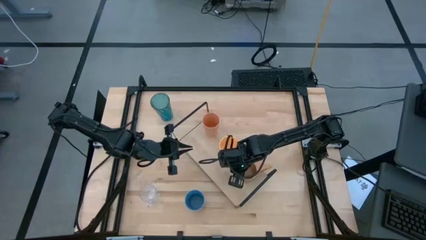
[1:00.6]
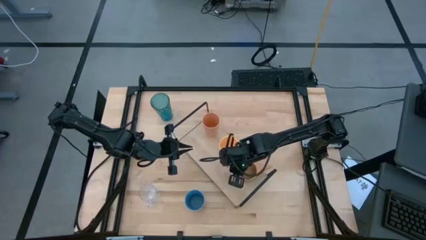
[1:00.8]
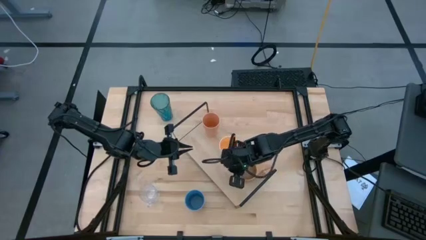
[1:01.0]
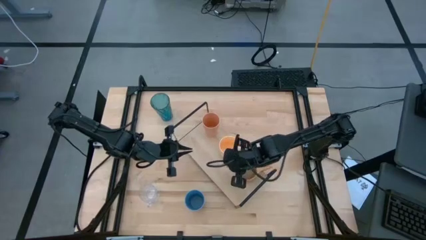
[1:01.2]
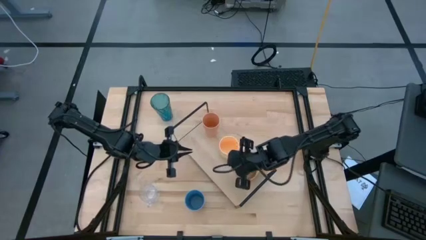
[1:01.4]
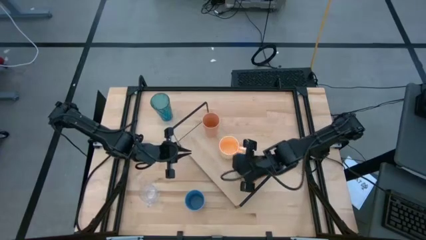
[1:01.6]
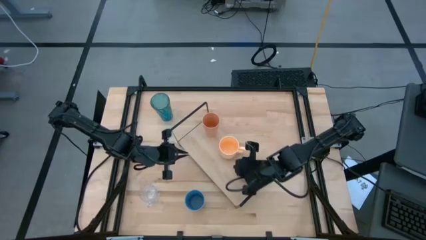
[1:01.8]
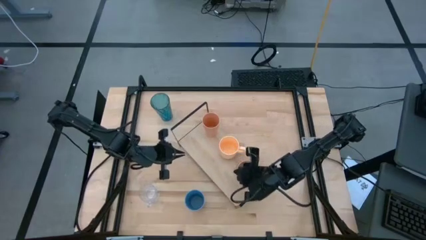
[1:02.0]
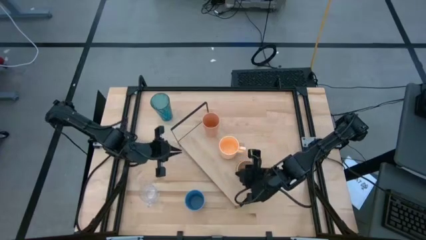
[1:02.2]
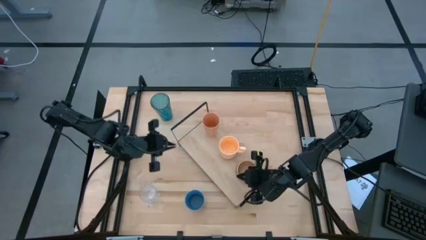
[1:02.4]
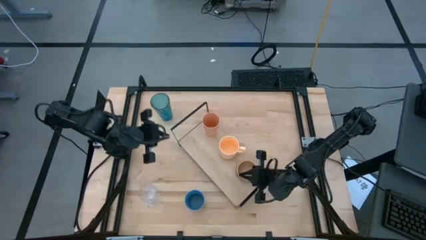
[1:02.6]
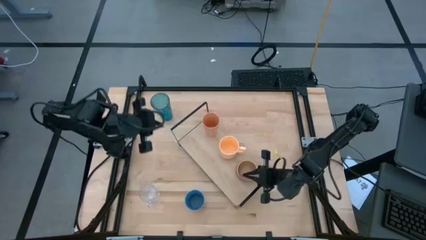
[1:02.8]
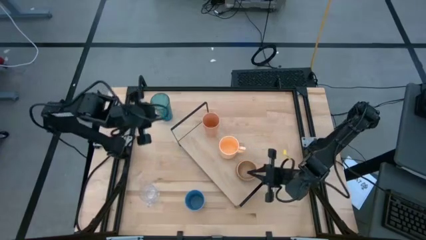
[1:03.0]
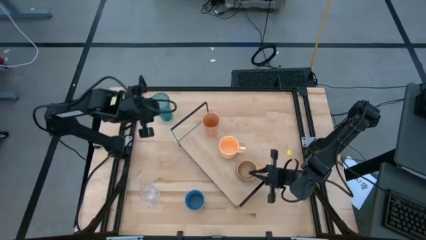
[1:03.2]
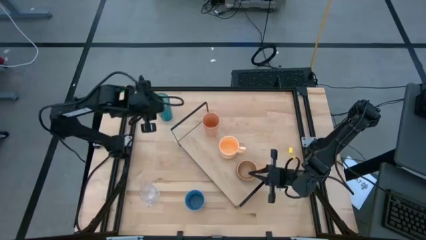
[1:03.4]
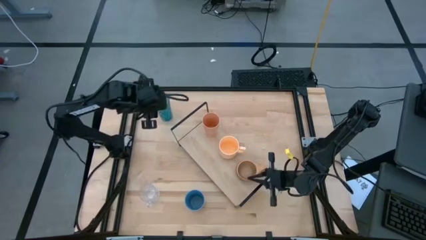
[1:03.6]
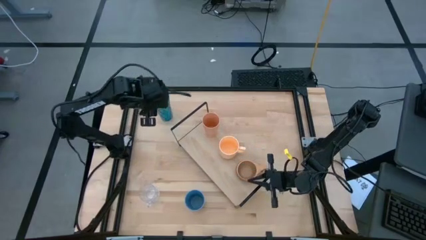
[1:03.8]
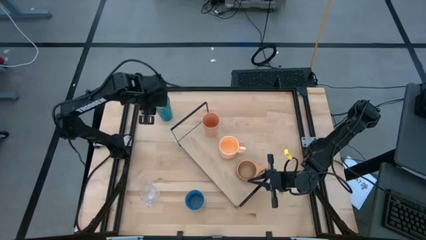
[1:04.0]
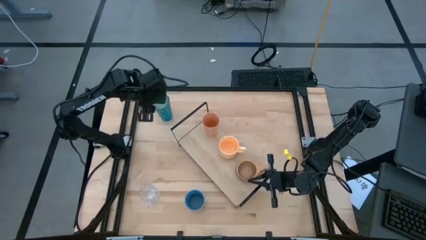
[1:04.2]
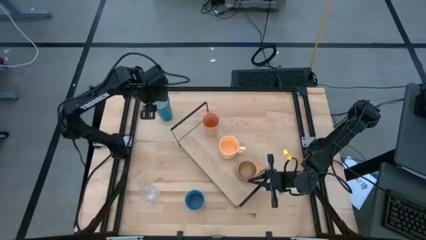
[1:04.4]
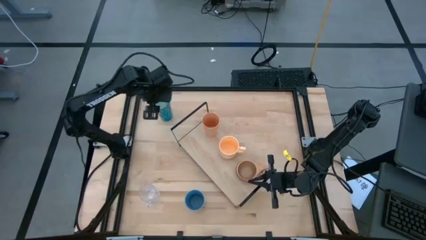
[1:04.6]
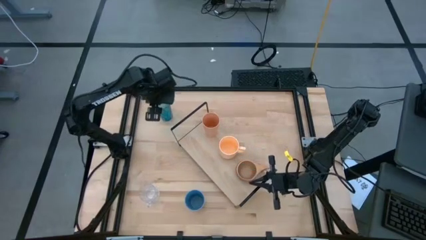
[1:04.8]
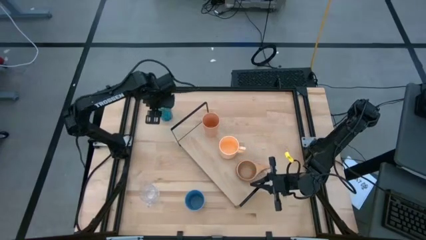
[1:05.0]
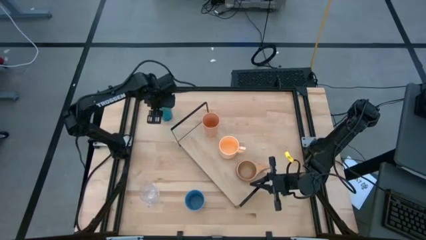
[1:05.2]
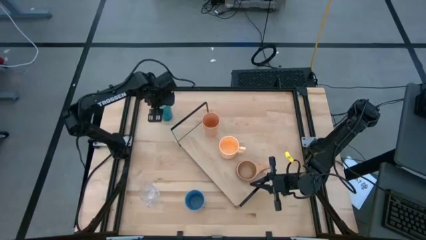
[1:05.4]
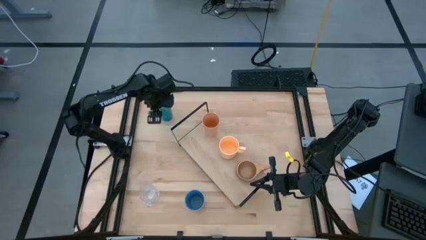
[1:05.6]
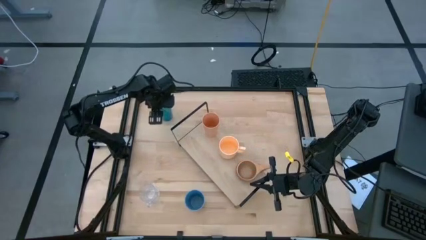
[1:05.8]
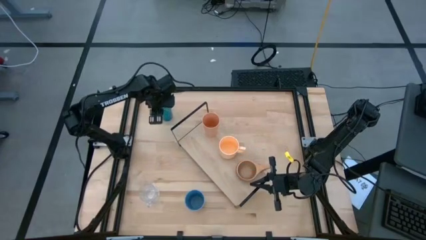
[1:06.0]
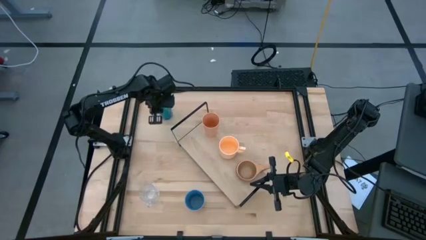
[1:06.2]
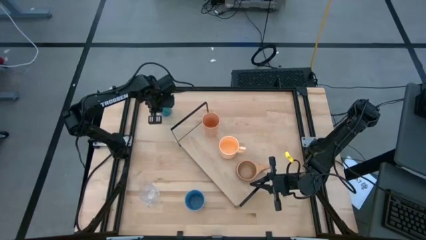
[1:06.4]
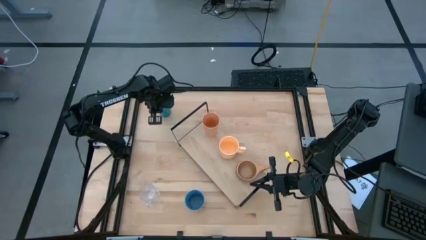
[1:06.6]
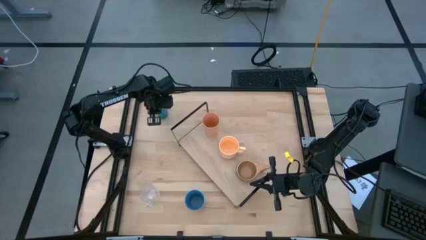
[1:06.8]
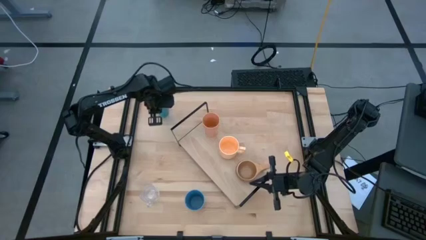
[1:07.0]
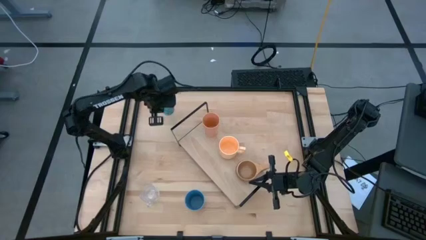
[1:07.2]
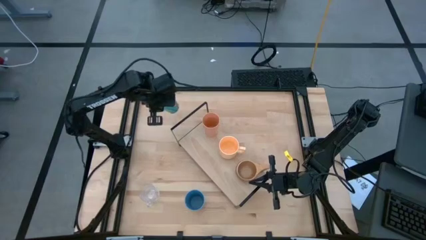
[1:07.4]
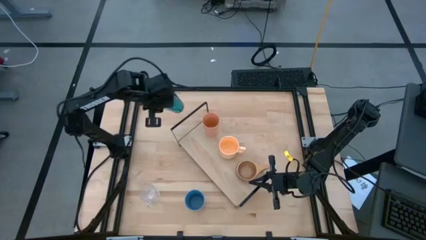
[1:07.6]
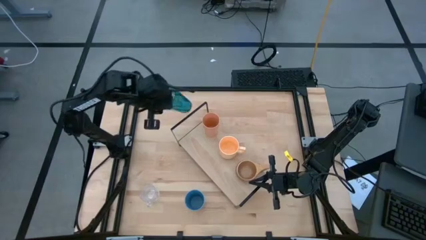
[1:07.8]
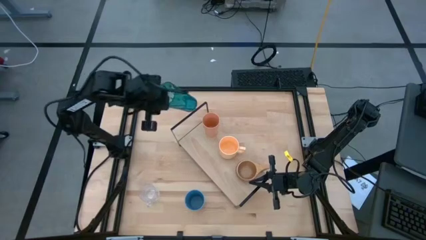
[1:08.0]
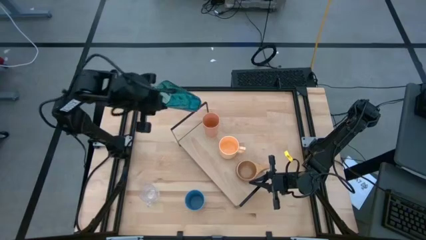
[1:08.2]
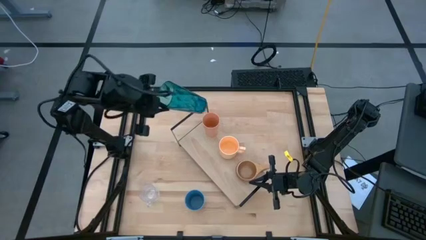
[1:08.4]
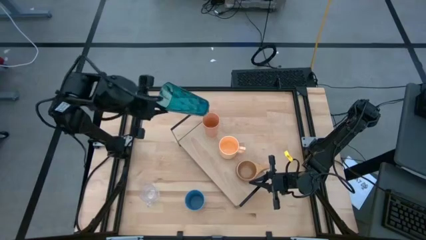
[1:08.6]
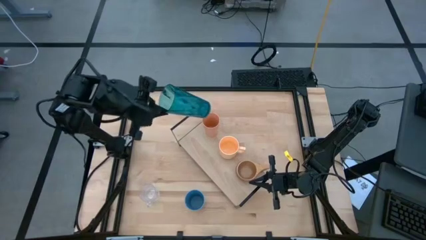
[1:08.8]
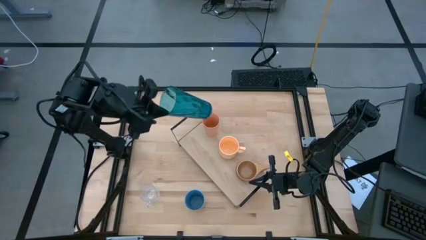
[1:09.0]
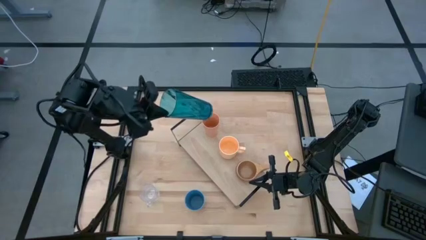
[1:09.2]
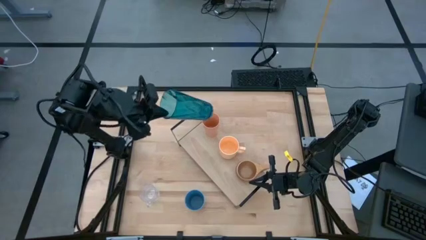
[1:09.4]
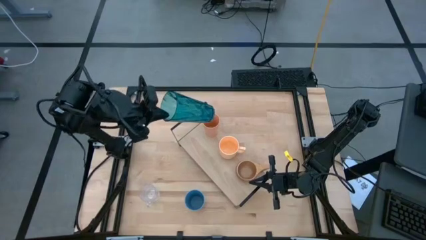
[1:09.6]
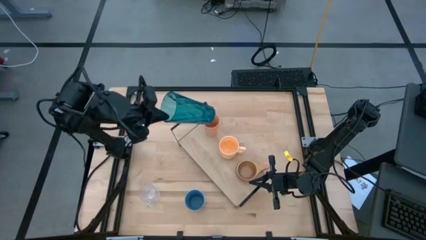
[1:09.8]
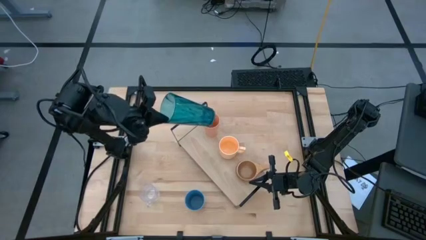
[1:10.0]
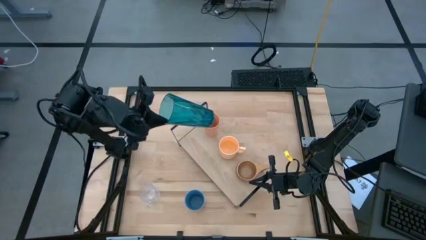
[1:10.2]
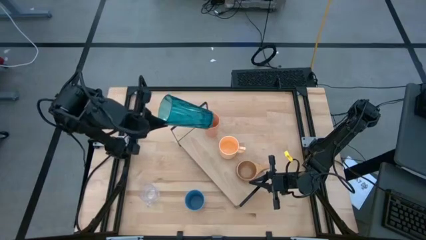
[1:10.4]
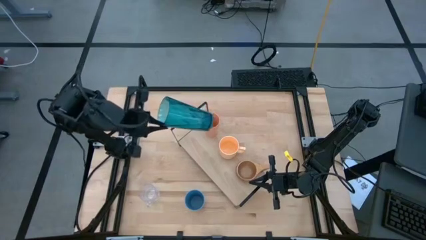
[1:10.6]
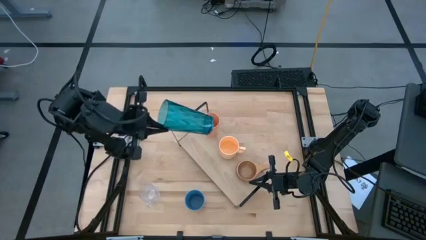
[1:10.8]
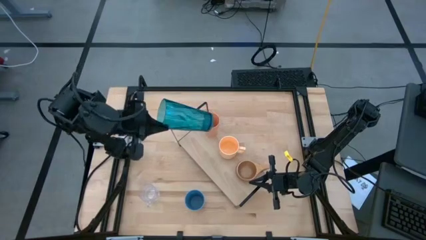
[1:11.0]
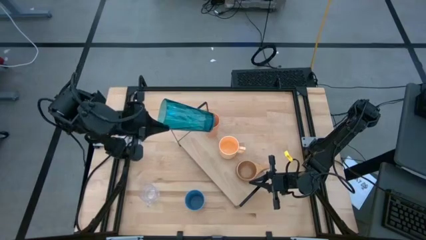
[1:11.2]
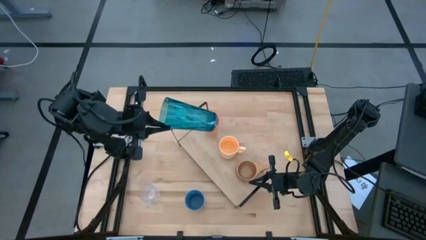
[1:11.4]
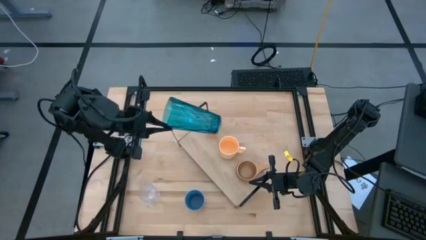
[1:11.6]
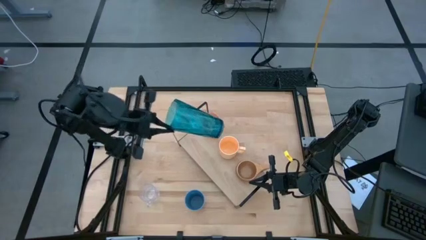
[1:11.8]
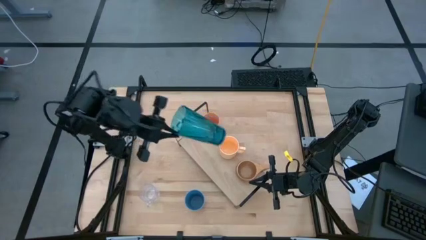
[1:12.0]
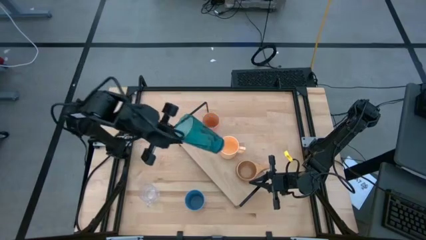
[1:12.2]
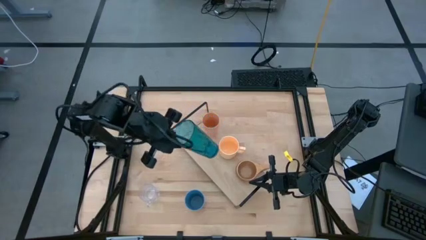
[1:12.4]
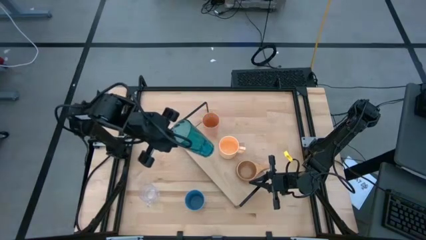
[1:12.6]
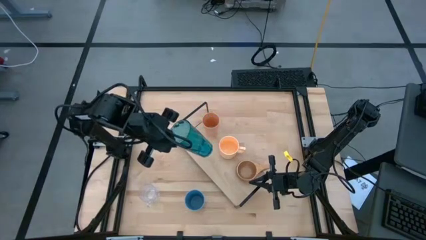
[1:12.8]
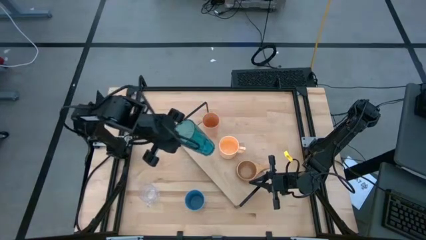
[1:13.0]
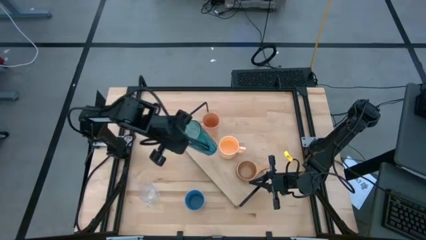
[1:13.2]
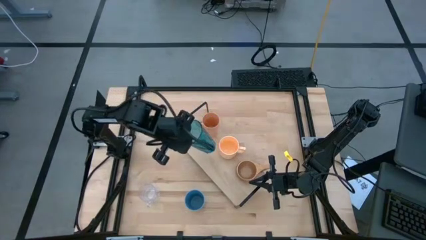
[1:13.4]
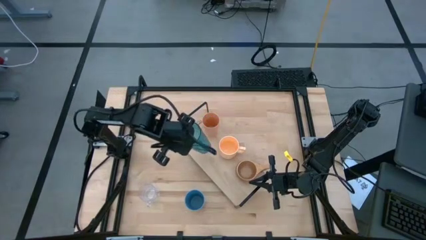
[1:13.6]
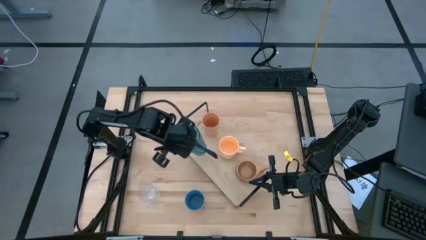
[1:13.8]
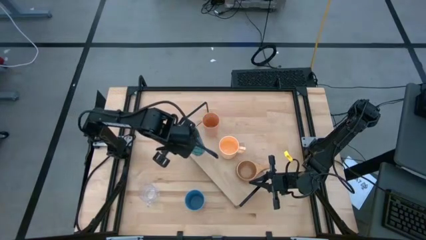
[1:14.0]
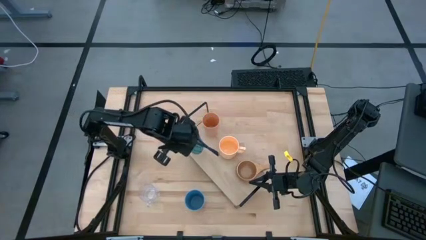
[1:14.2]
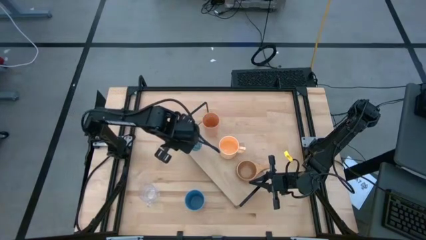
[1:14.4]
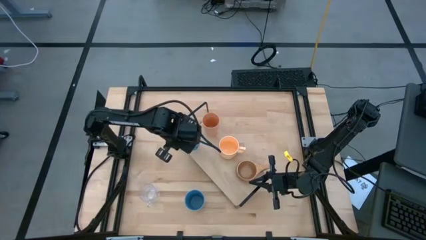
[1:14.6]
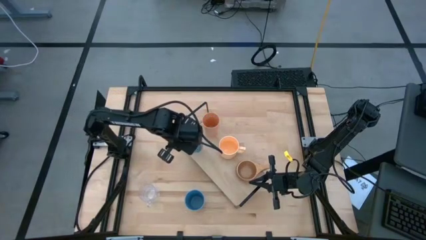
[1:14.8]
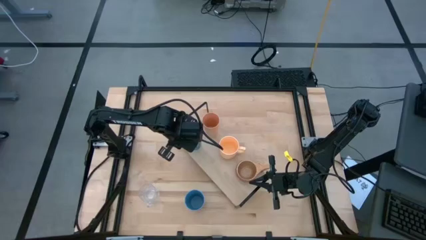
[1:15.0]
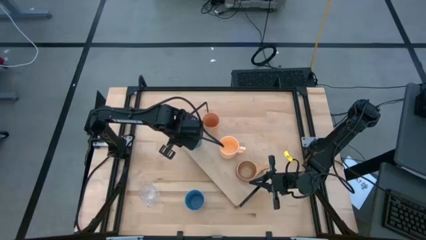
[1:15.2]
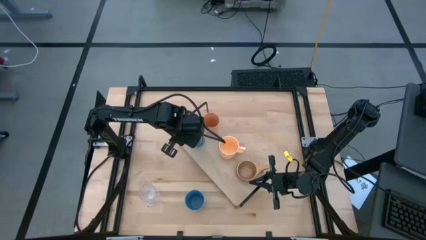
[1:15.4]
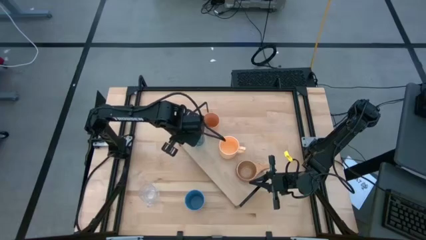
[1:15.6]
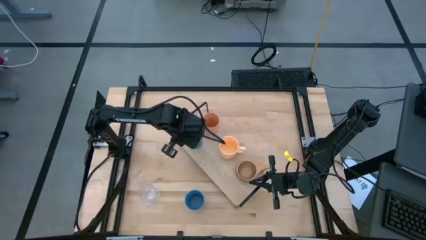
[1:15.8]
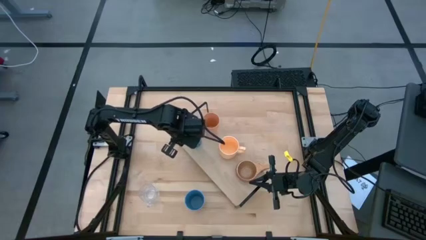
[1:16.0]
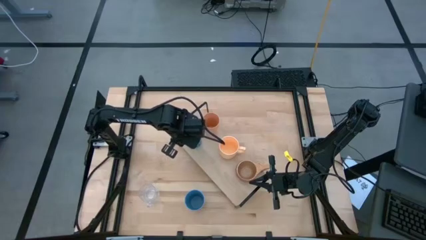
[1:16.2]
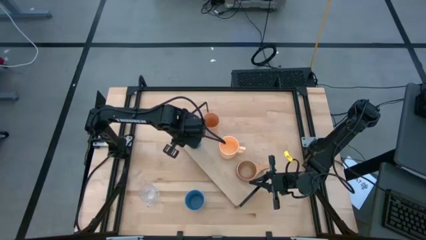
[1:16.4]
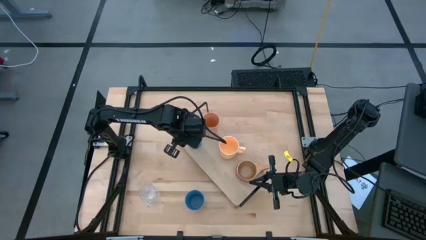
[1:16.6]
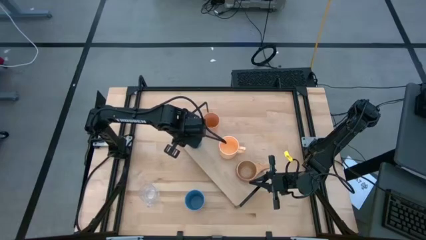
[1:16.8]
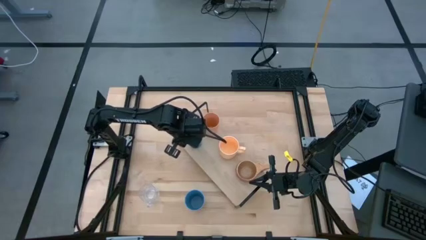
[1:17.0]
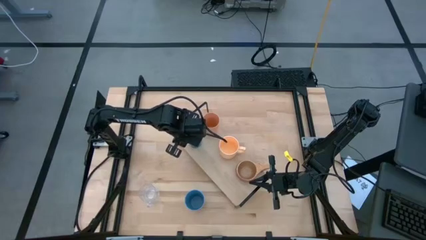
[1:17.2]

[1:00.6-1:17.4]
Task: Stack small to large cups/mugs on shelf
Put the blue glass on the shelf
